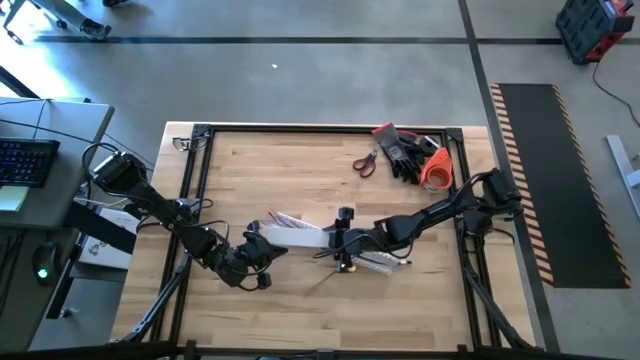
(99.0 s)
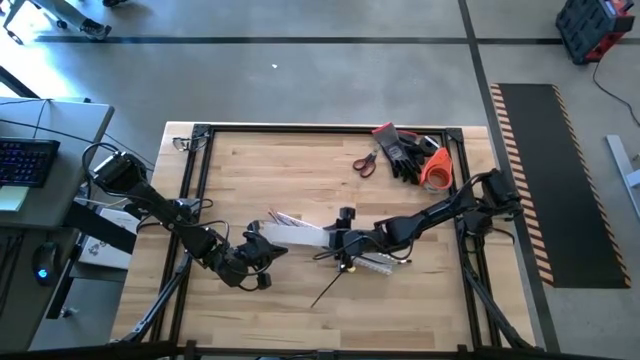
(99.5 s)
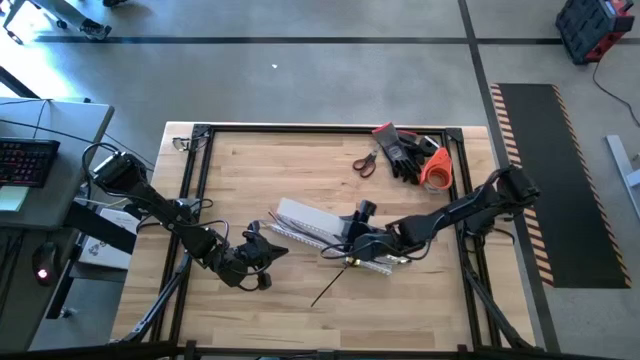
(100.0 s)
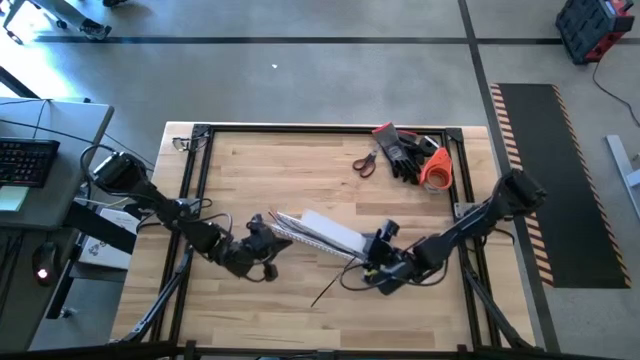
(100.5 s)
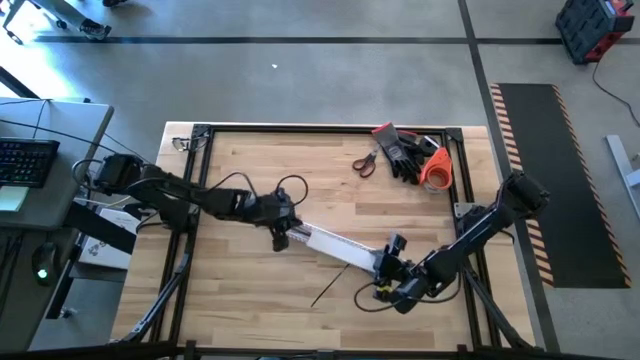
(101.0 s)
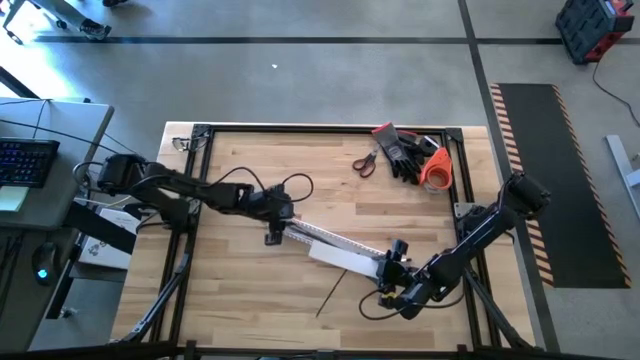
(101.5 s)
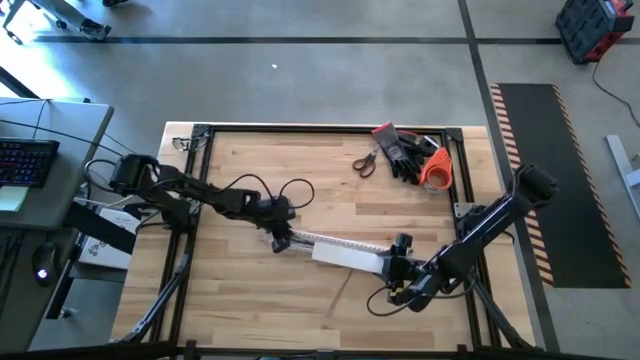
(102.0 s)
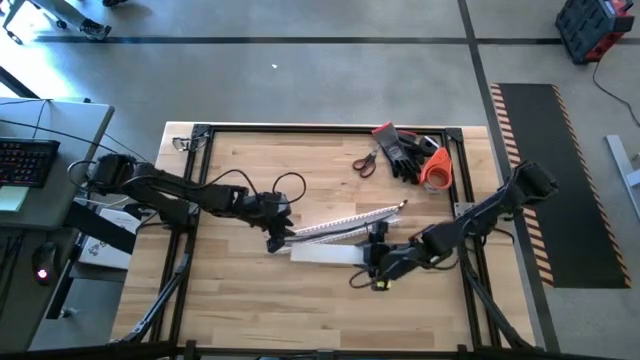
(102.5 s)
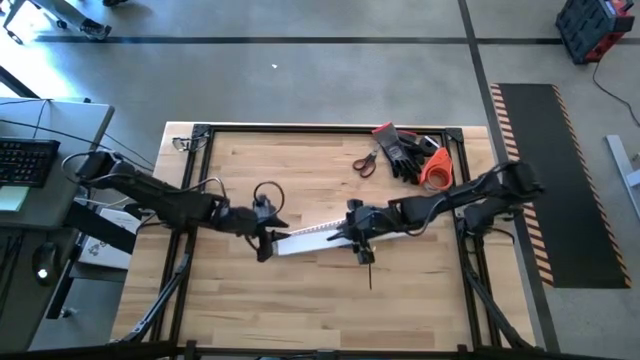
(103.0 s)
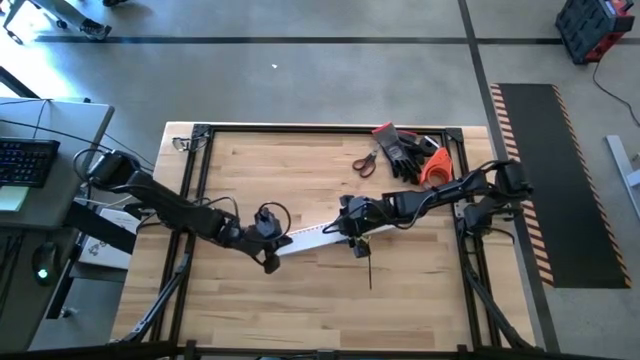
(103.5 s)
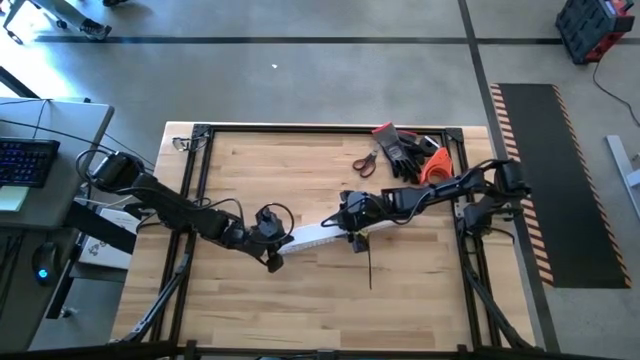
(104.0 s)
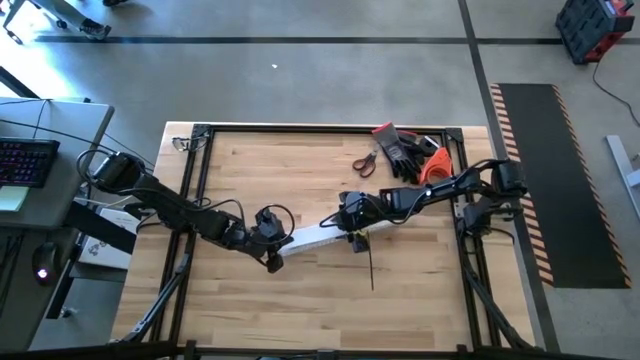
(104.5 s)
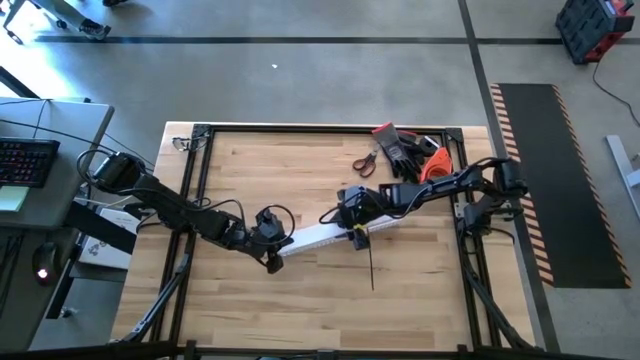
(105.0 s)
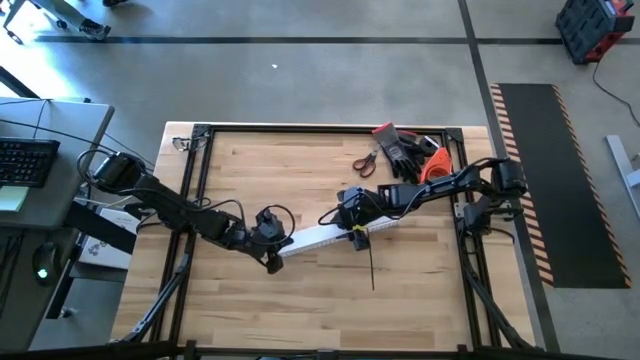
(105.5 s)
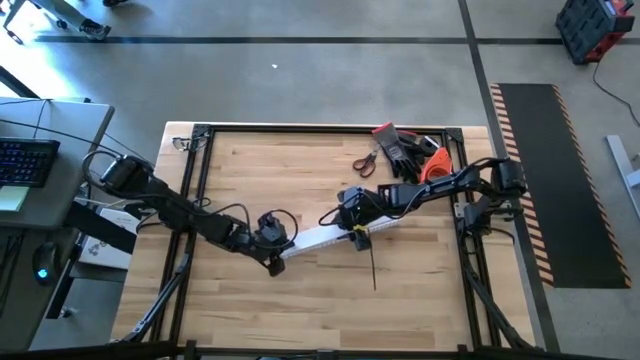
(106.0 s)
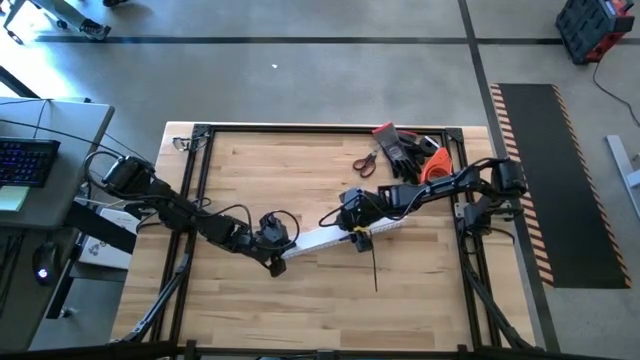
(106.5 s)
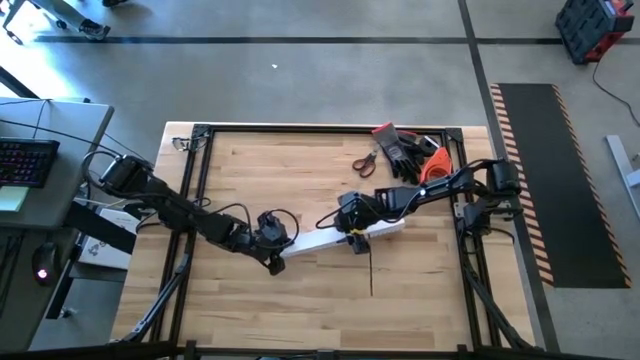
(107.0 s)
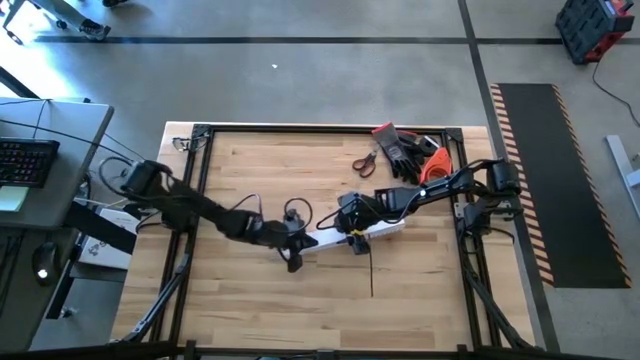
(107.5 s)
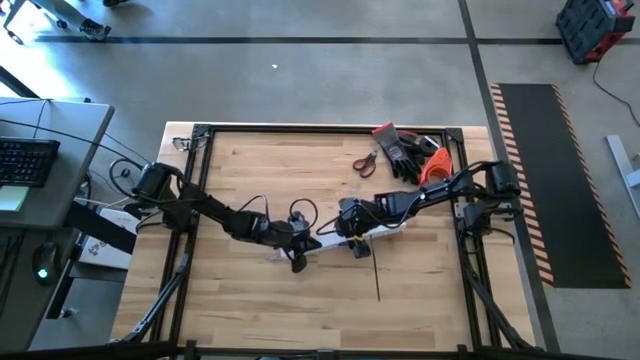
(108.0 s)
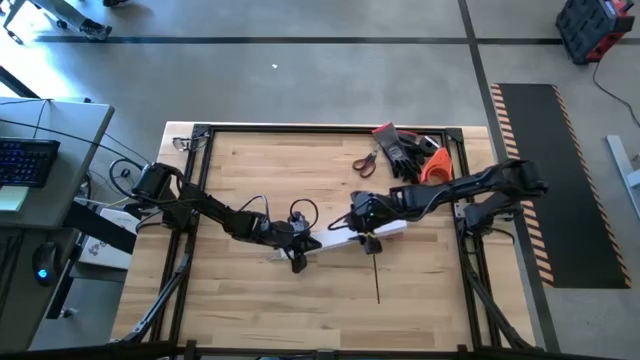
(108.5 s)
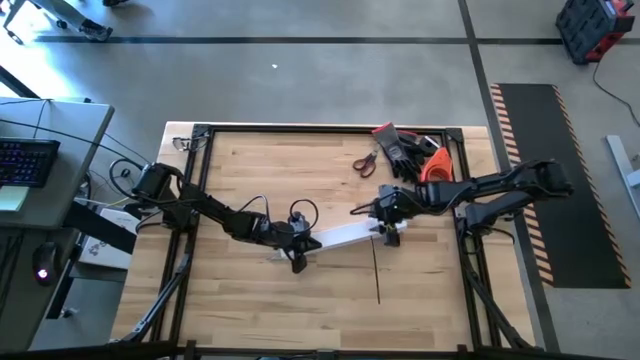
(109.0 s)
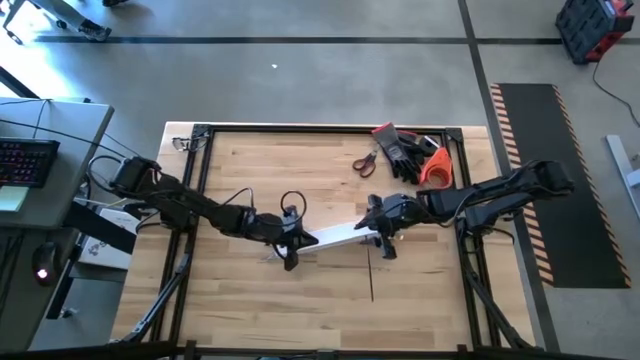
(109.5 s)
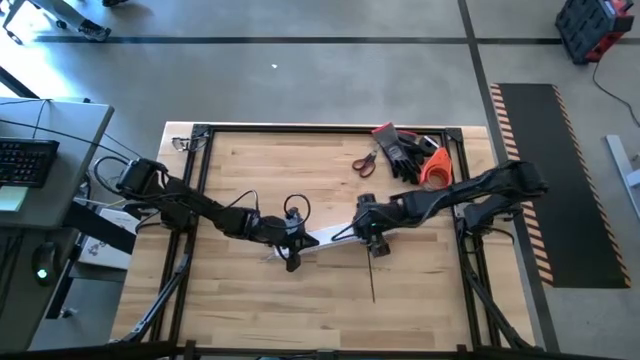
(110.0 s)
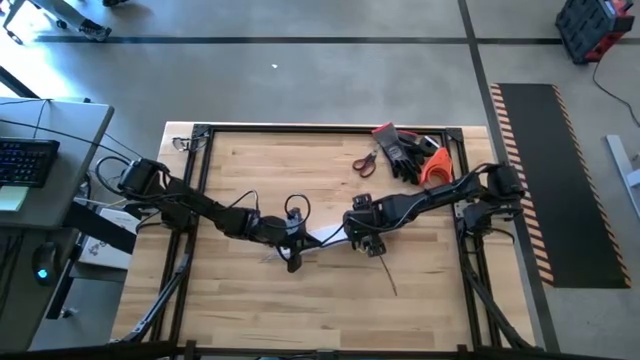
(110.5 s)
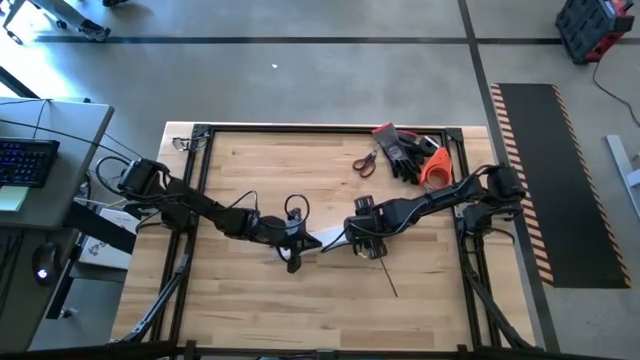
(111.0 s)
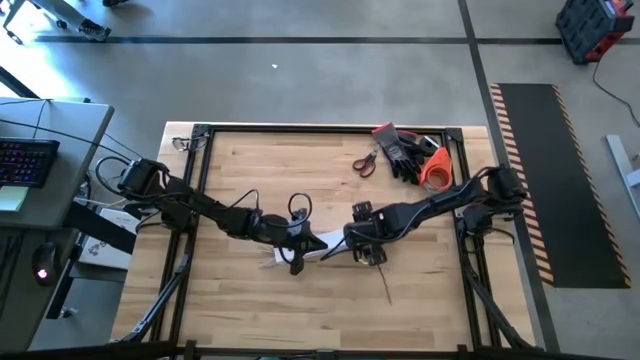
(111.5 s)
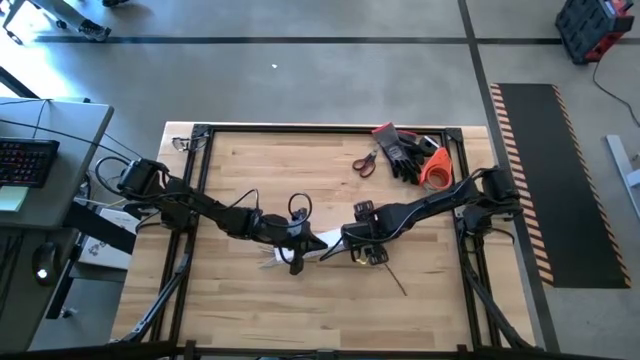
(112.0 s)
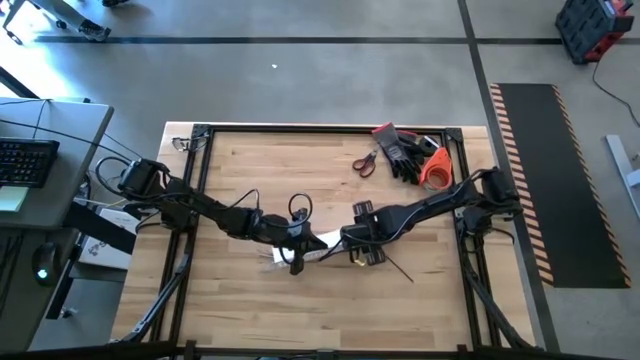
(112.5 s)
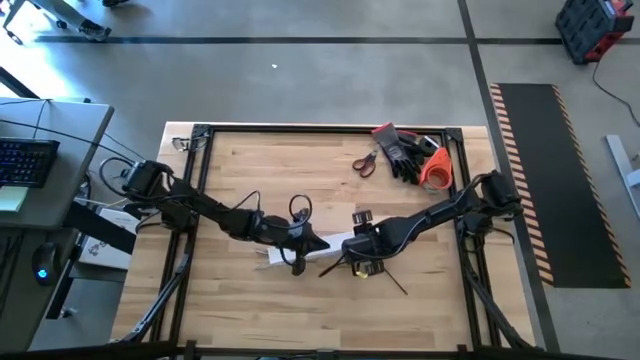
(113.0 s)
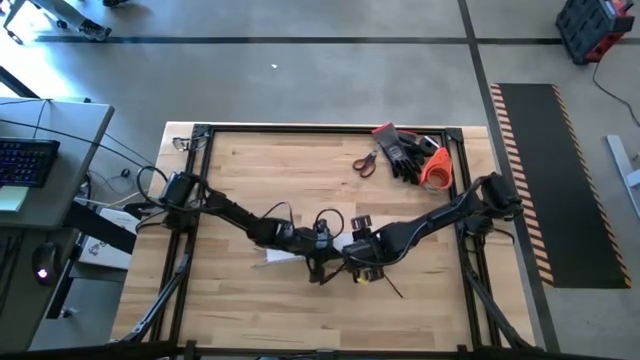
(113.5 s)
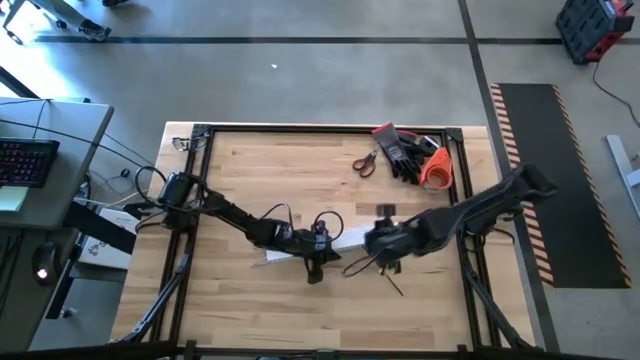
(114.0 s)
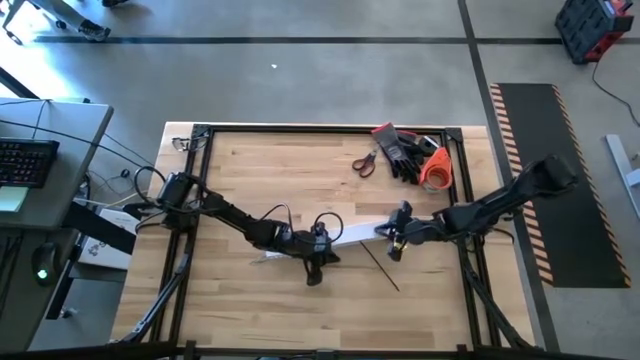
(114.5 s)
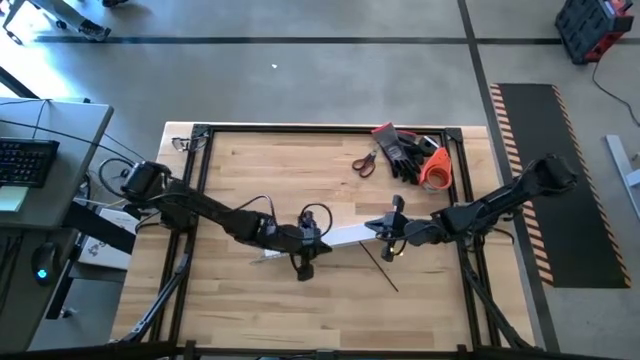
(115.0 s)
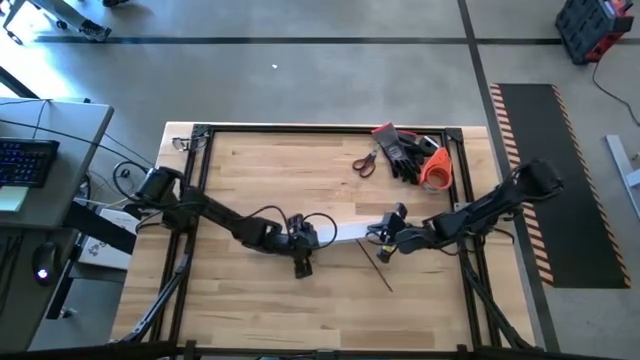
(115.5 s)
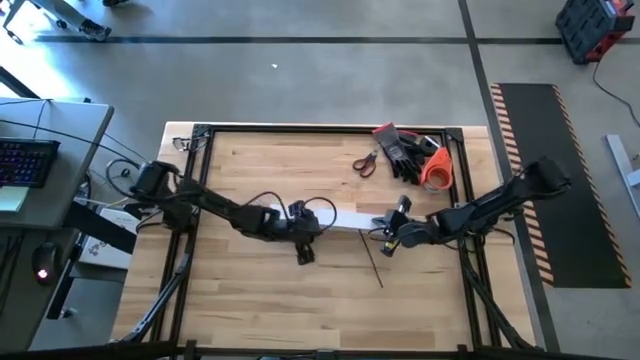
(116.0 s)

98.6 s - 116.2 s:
Task: Ziptie cables
Close the white cable duct

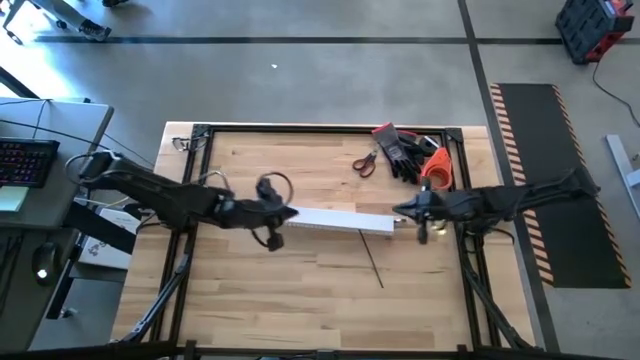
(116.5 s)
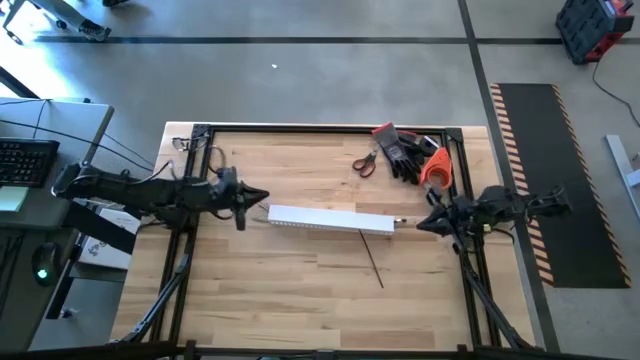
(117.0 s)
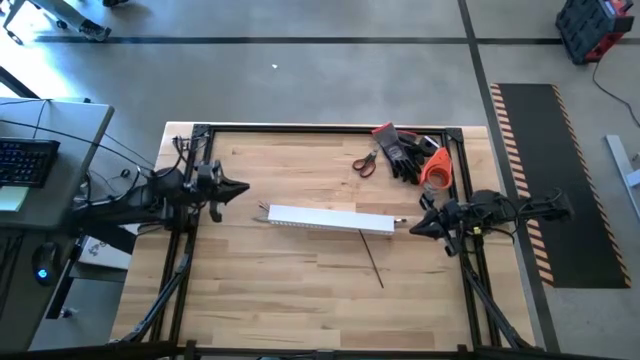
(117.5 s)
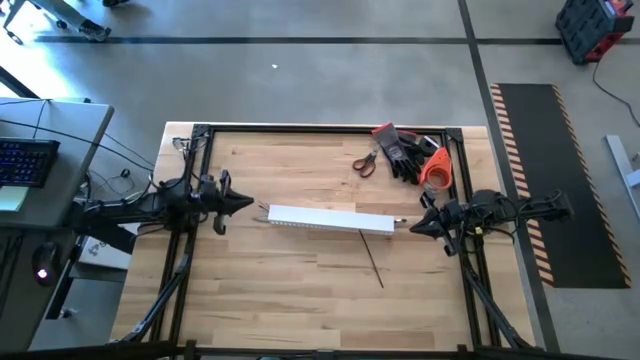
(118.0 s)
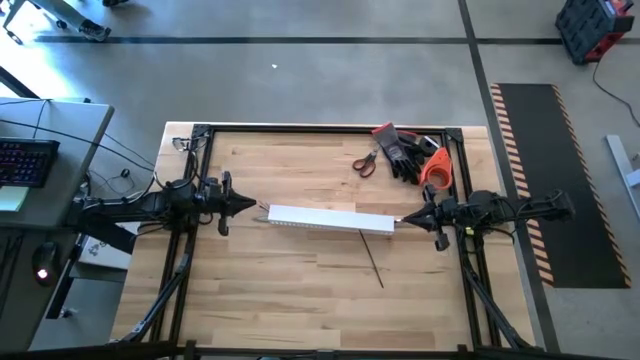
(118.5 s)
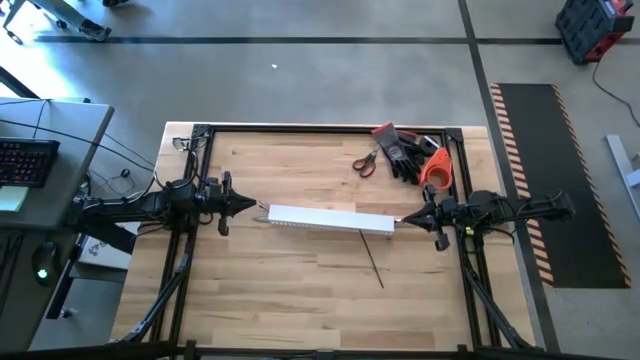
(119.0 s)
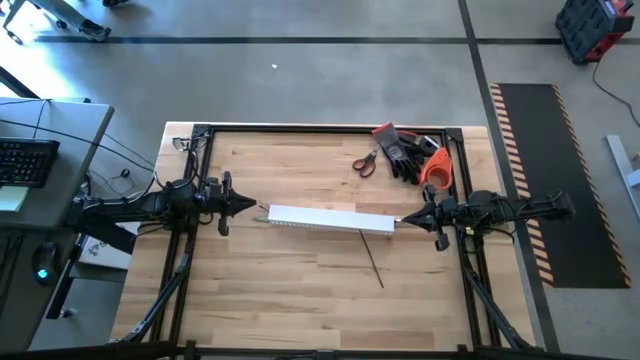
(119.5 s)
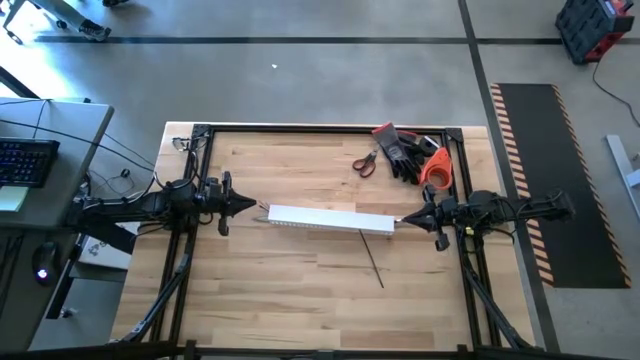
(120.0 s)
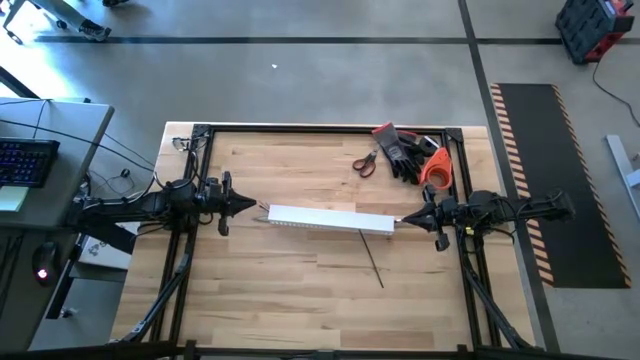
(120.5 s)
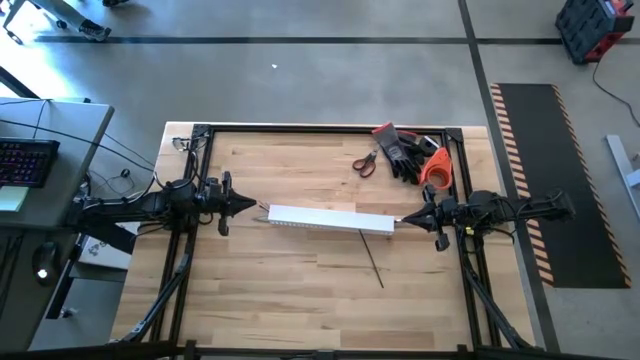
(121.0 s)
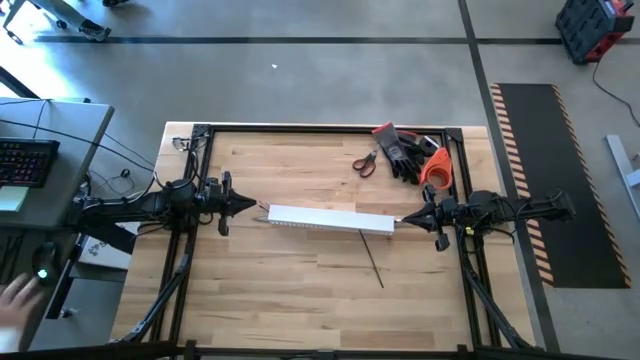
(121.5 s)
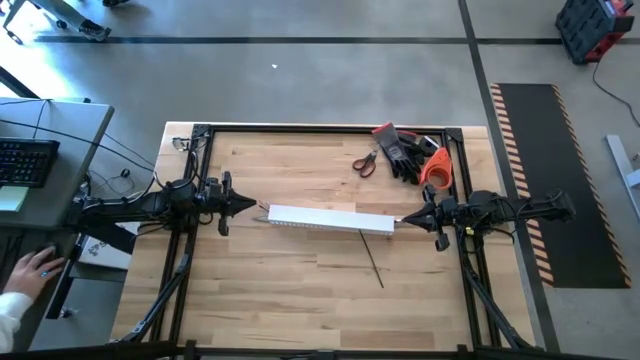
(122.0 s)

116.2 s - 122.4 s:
Return to Home Position
